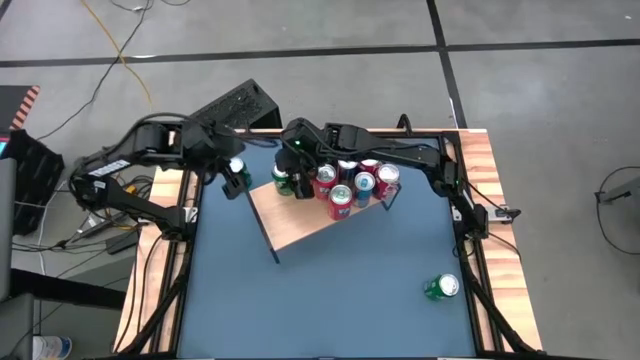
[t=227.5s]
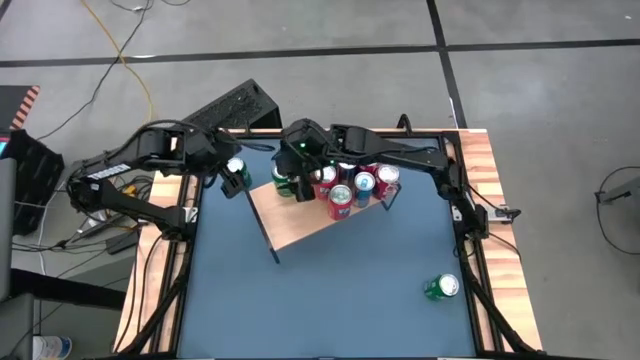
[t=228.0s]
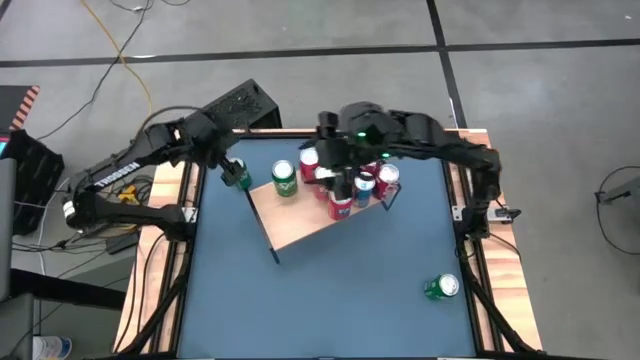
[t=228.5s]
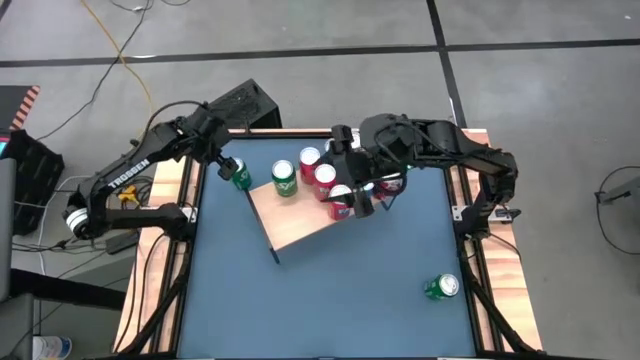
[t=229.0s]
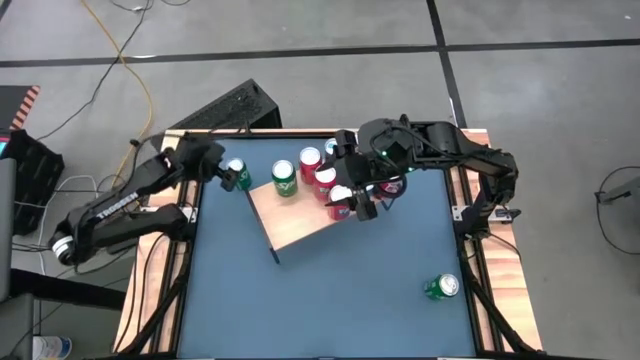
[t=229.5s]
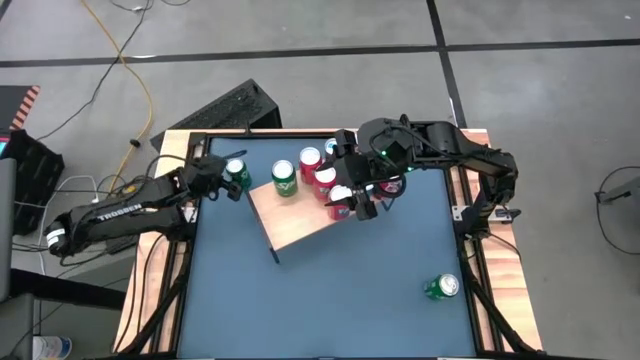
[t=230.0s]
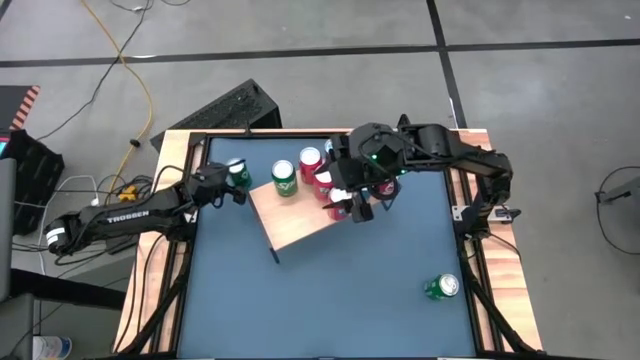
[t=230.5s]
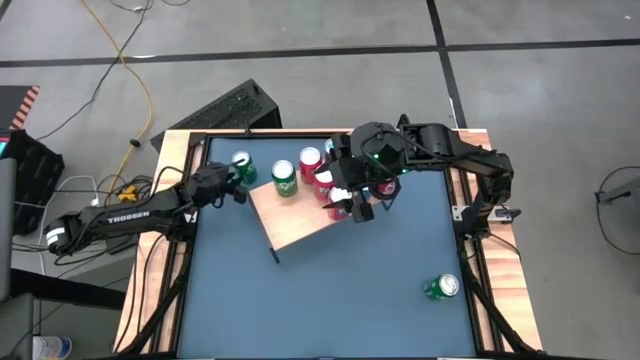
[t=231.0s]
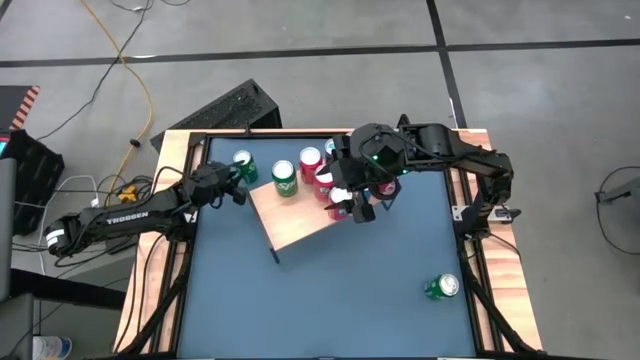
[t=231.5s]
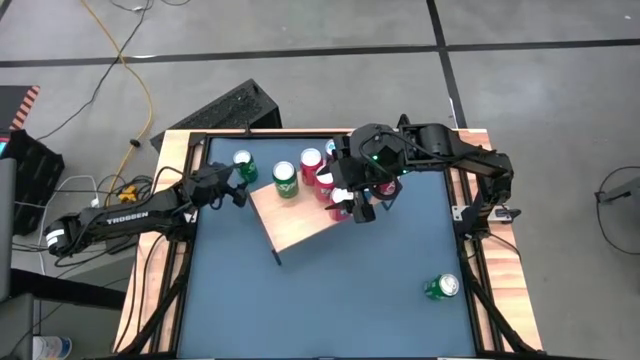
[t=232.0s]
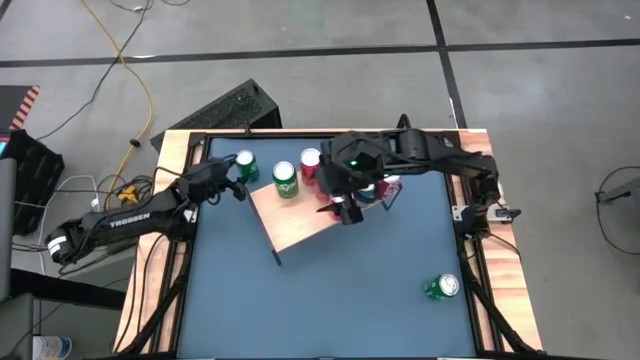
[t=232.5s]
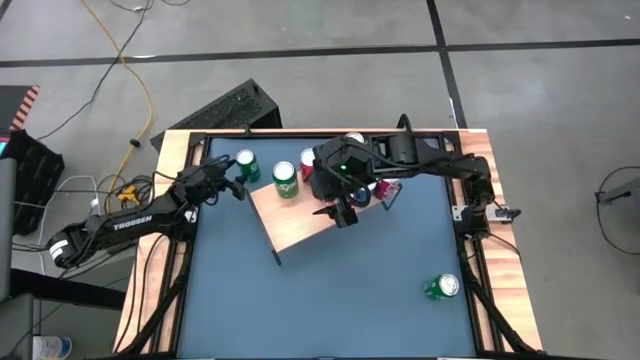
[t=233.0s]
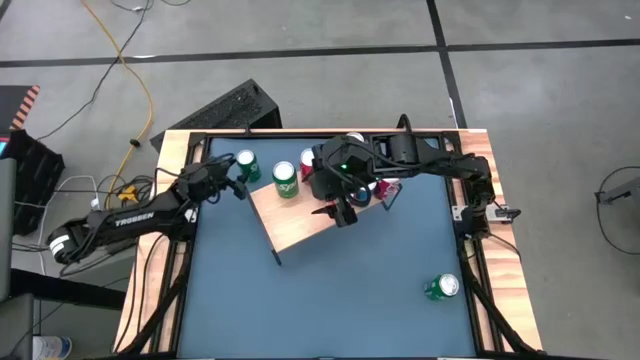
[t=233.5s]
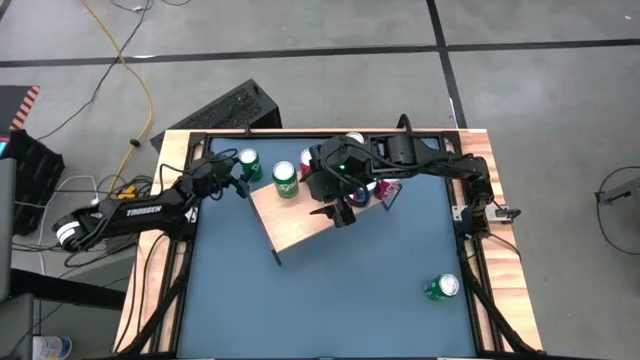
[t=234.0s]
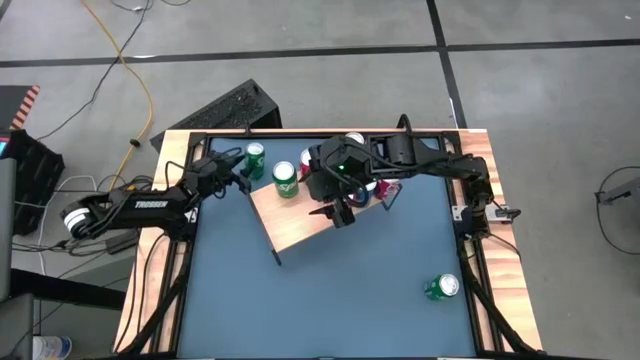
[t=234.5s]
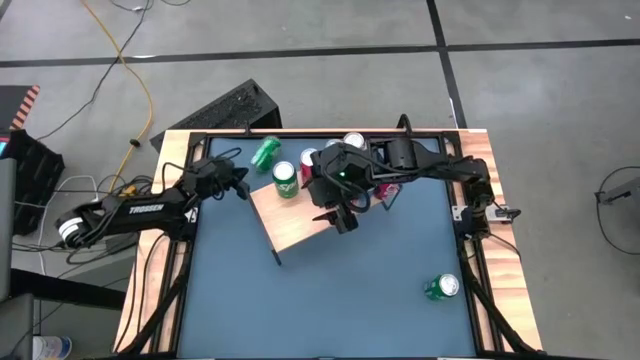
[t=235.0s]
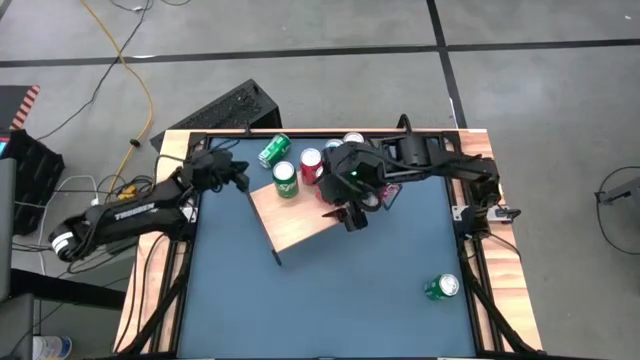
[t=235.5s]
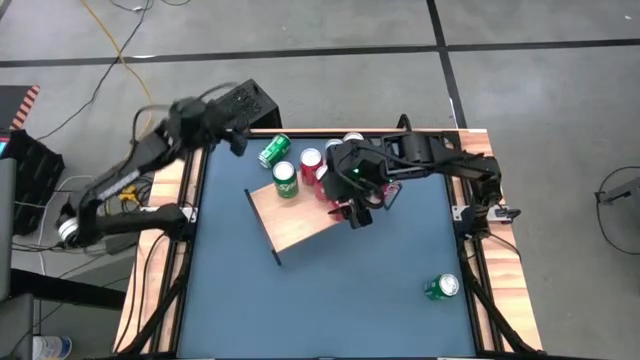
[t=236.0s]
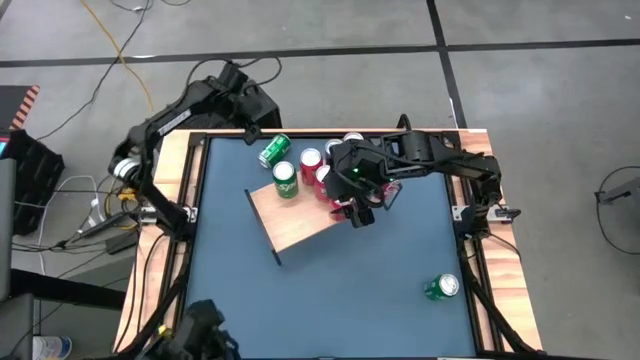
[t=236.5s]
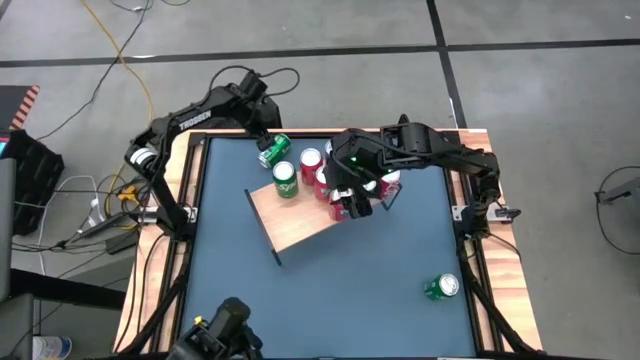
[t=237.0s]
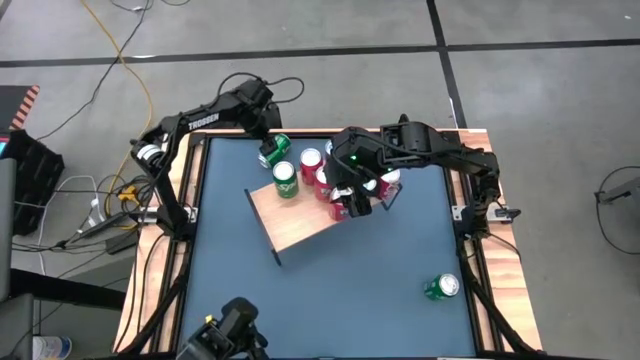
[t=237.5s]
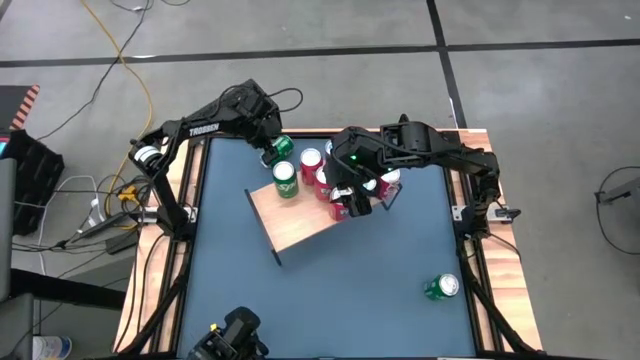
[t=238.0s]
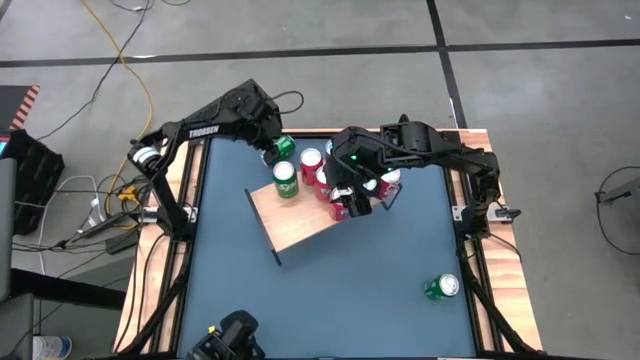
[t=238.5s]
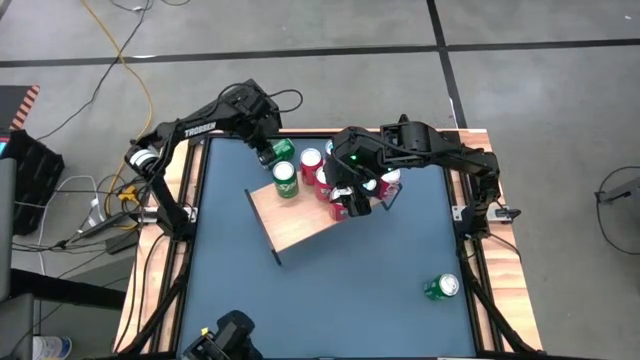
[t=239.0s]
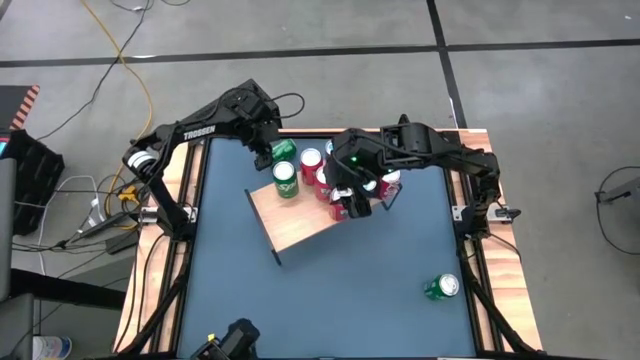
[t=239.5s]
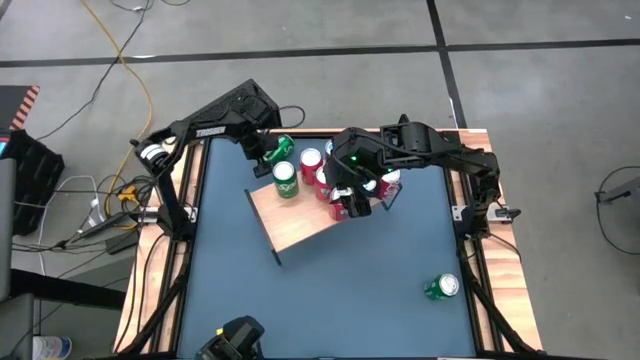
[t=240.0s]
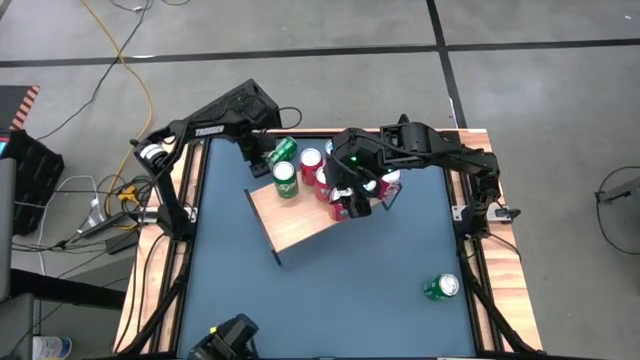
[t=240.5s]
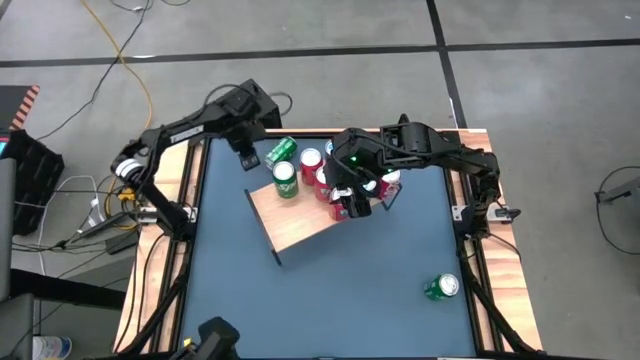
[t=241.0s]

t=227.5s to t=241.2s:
Task: Place canned beverage on shelf
Put the top green soda can on the shelf aligned with the other green soda can

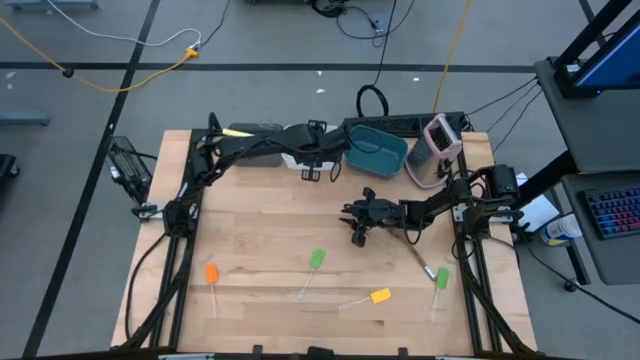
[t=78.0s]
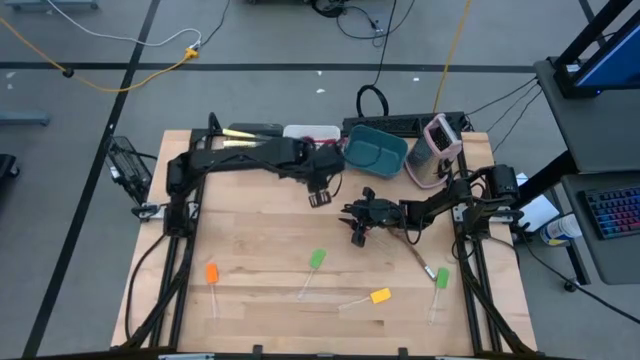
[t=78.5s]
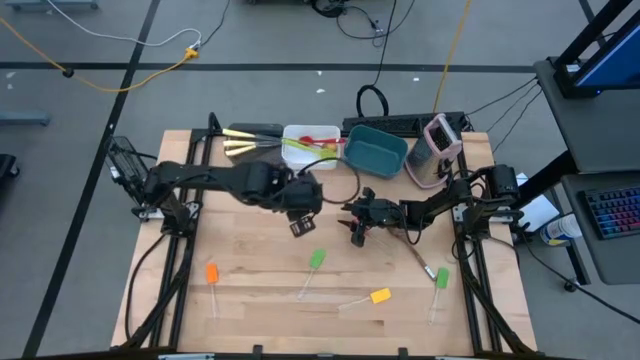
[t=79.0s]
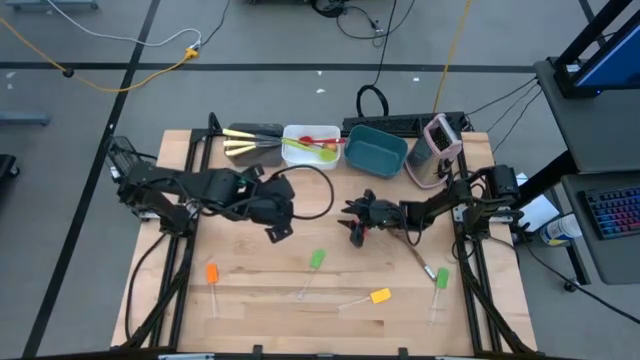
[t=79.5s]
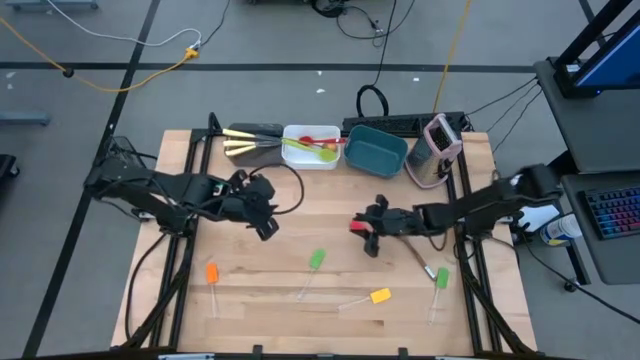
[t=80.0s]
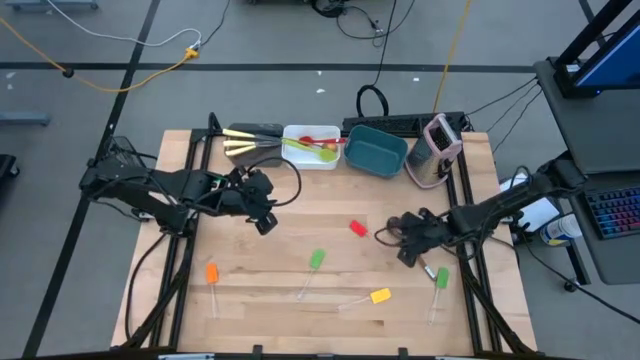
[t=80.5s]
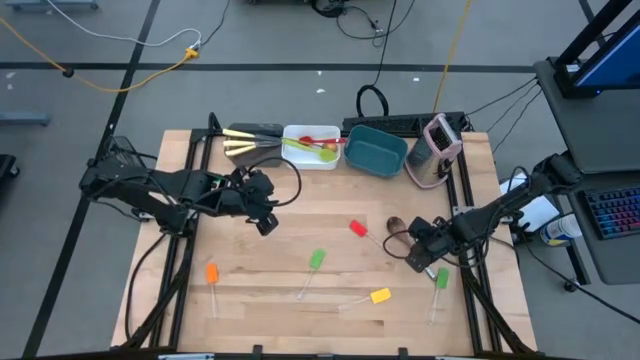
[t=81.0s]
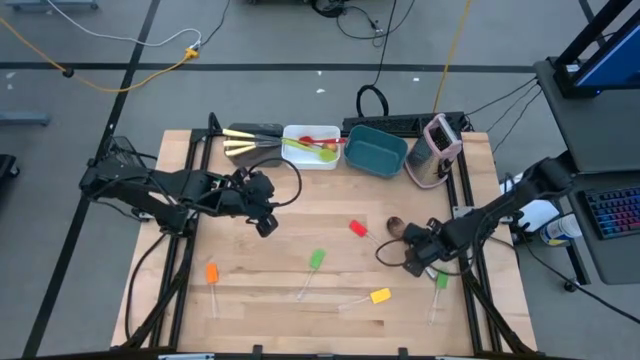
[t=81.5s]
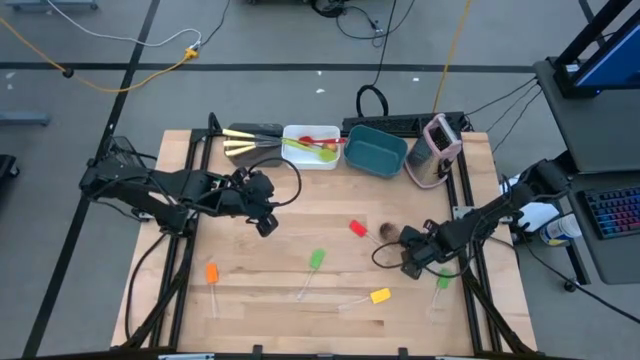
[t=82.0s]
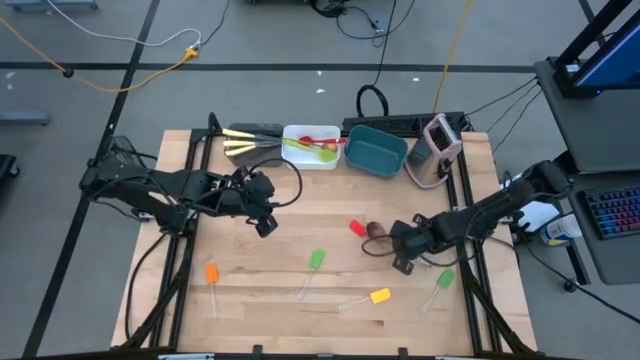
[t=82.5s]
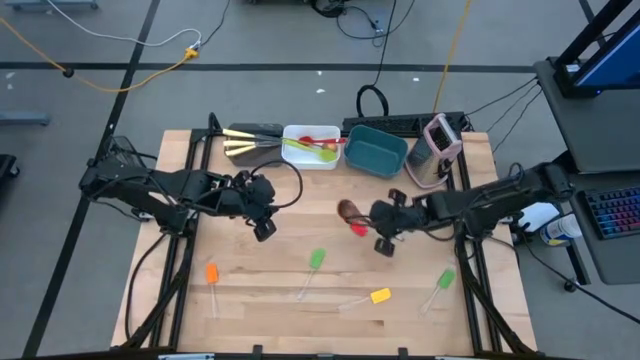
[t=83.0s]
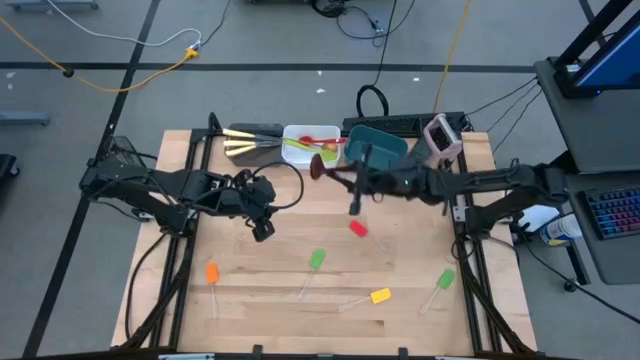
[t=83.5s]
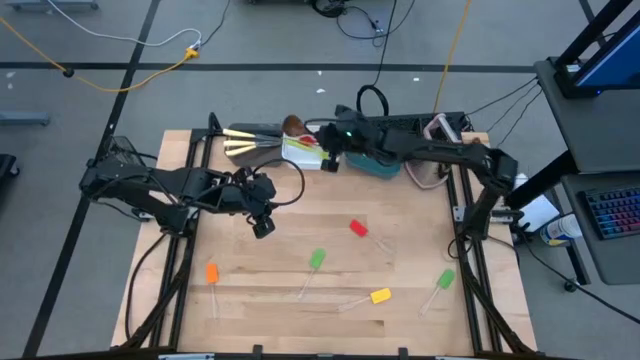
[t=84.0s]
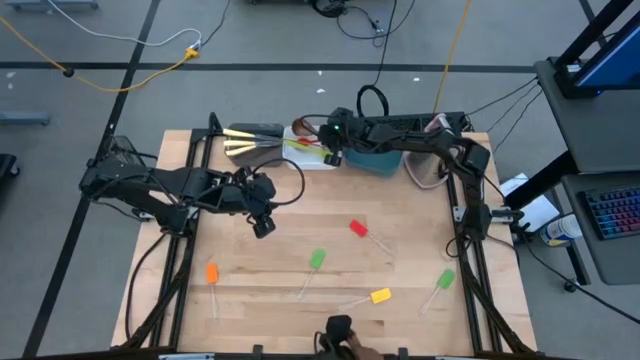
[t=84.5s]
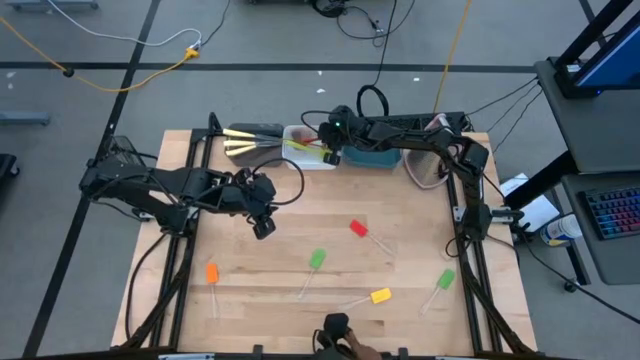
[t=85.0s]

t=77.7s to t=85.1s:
Task: Pick & Place Kitchen Items
Put the wooden serving spoon into the white bin
